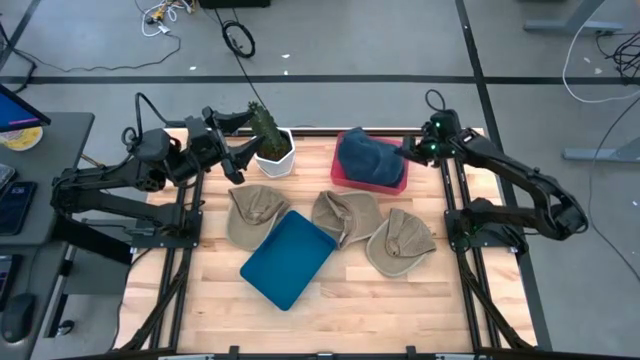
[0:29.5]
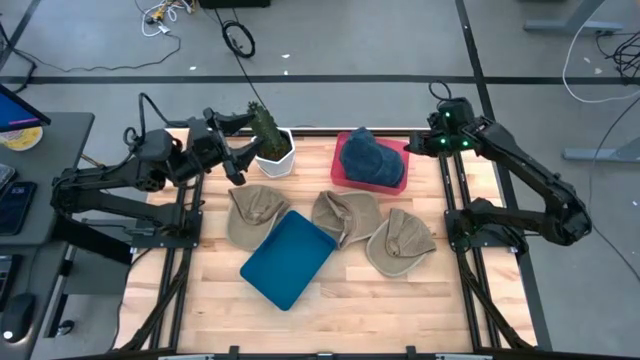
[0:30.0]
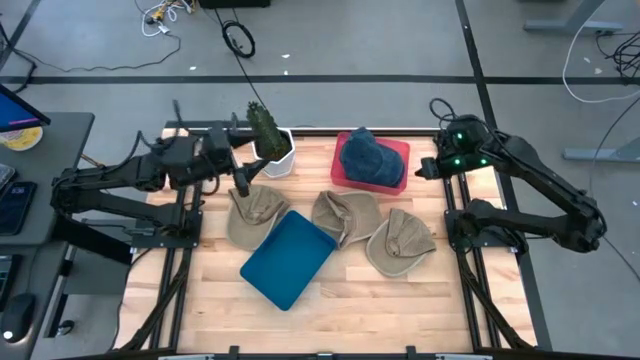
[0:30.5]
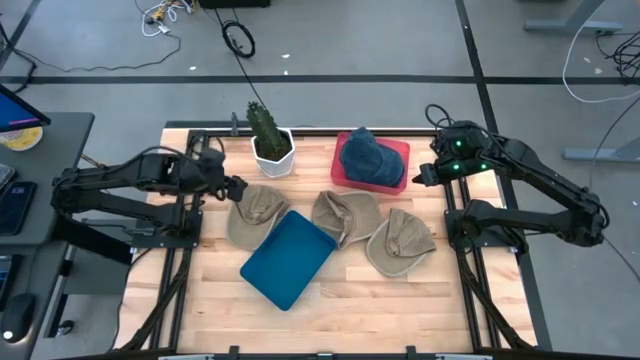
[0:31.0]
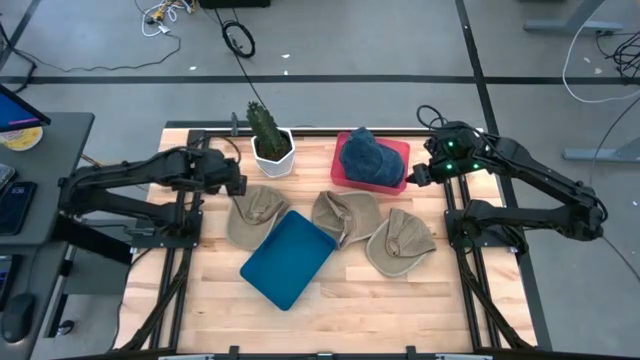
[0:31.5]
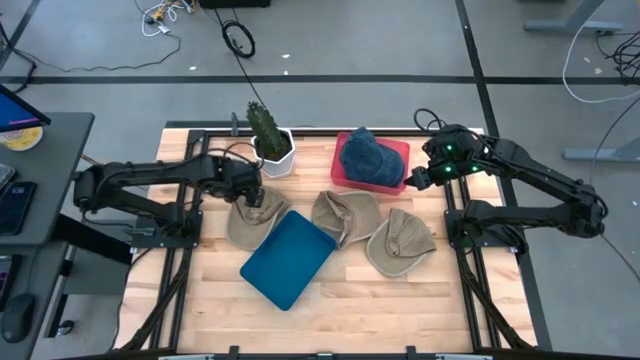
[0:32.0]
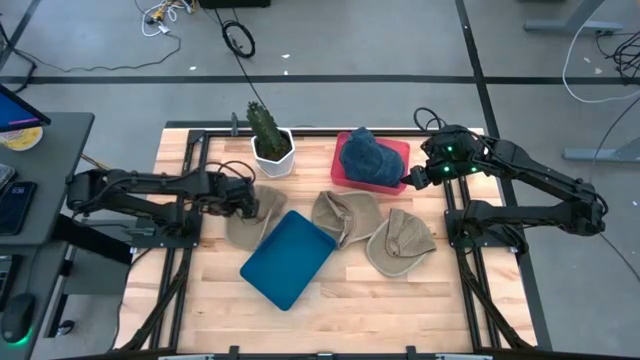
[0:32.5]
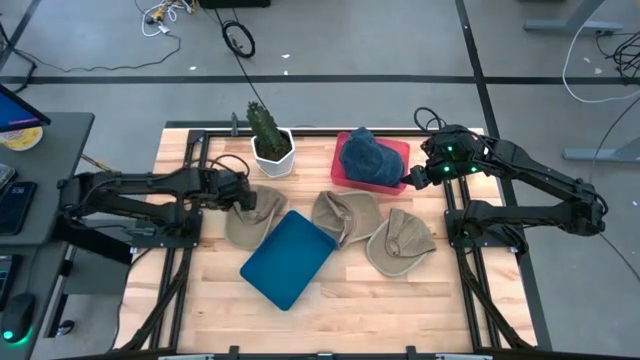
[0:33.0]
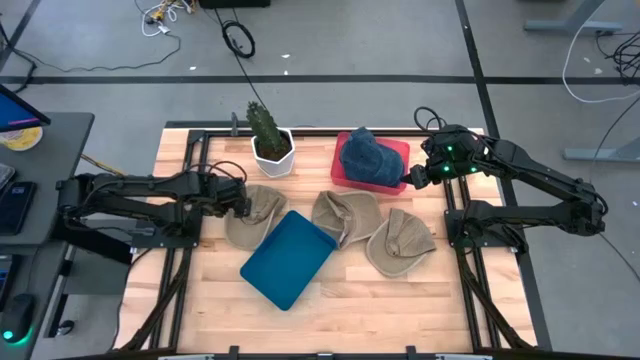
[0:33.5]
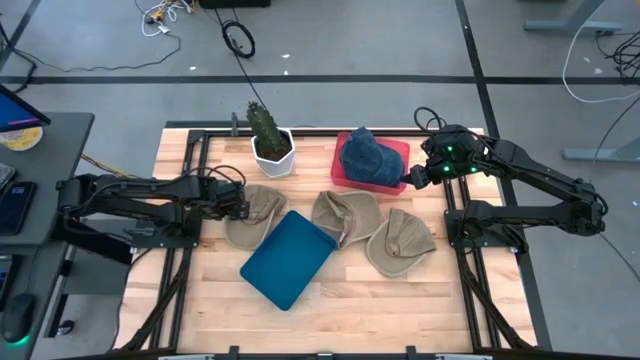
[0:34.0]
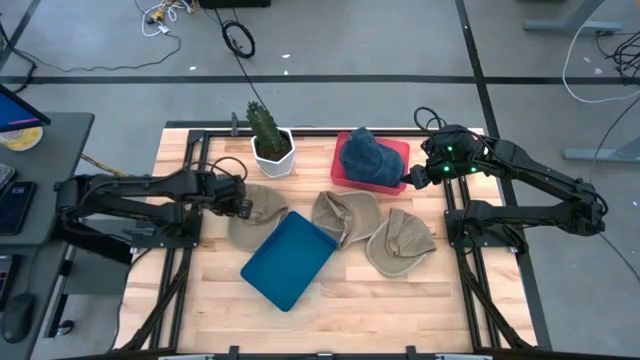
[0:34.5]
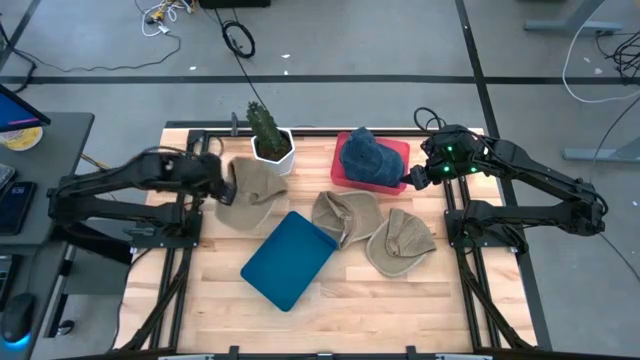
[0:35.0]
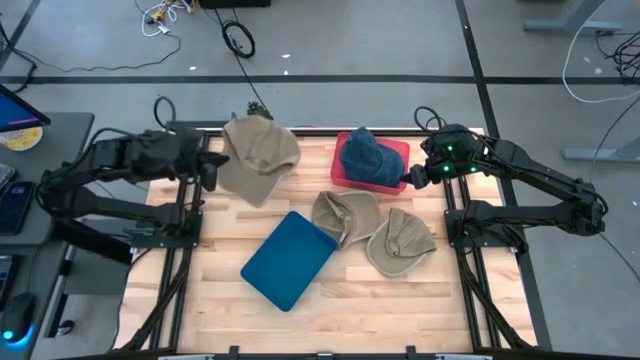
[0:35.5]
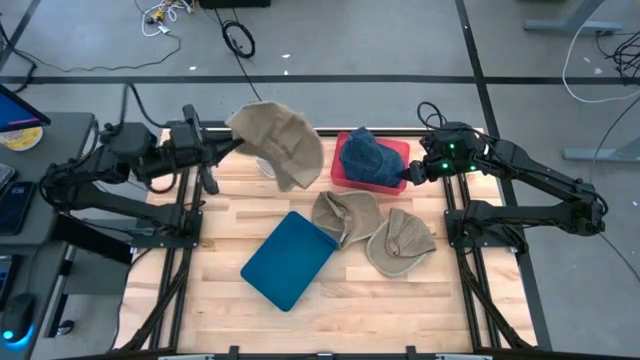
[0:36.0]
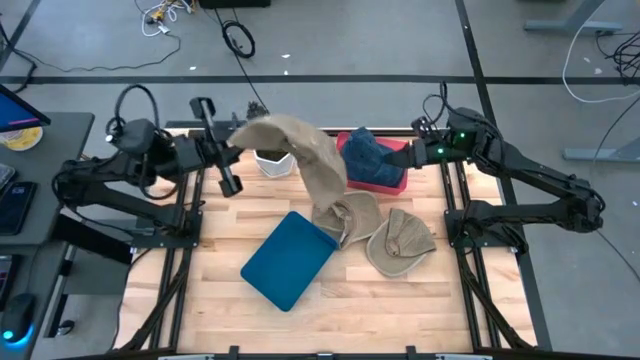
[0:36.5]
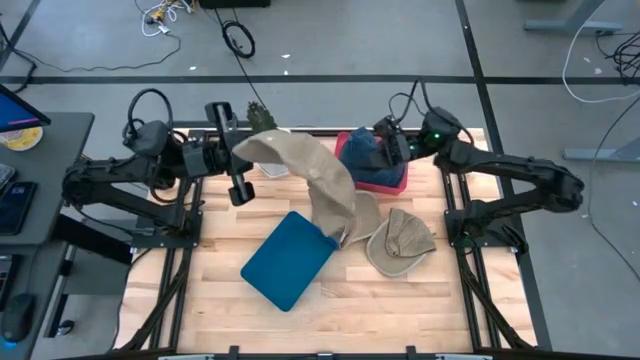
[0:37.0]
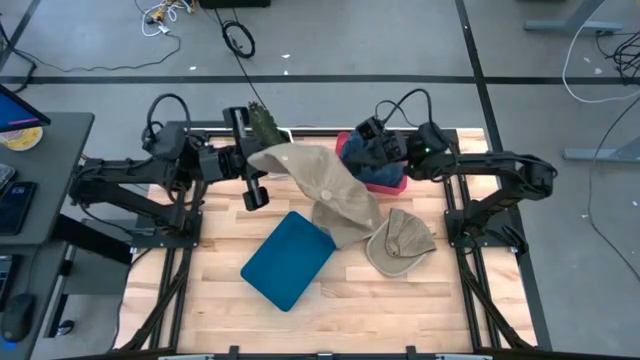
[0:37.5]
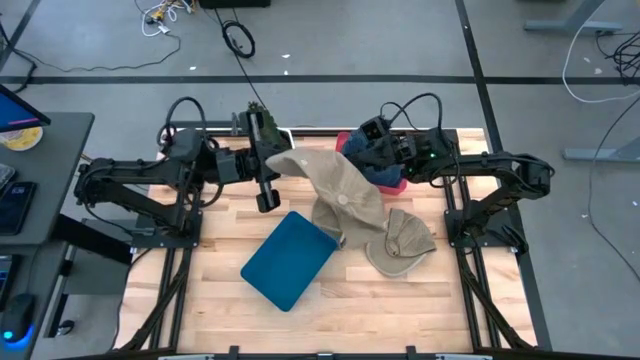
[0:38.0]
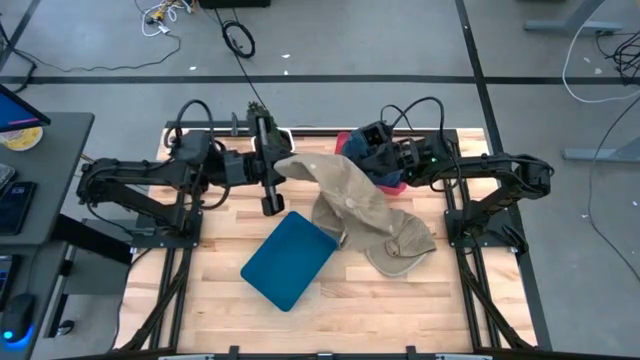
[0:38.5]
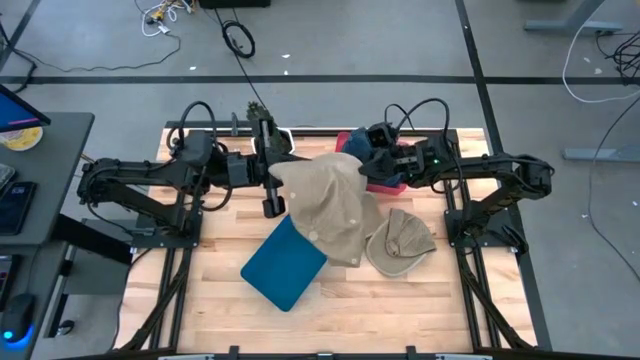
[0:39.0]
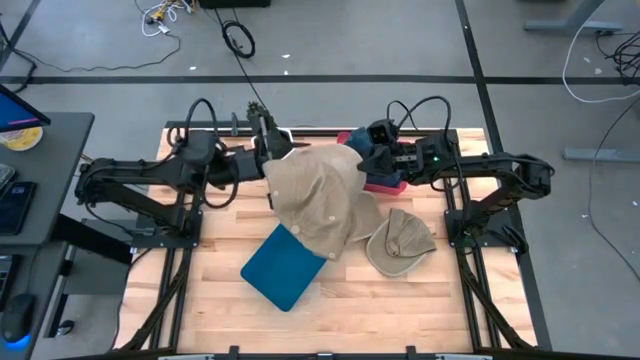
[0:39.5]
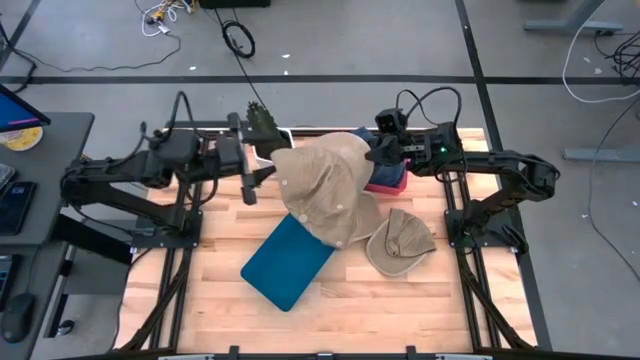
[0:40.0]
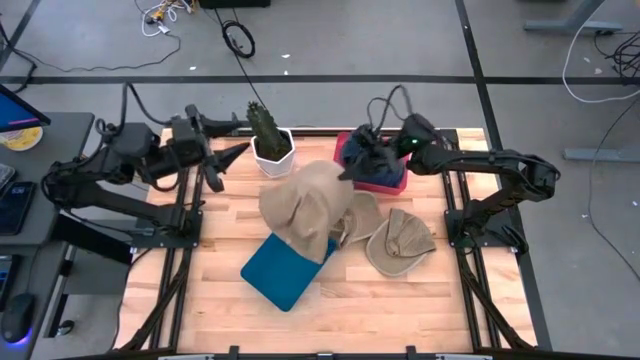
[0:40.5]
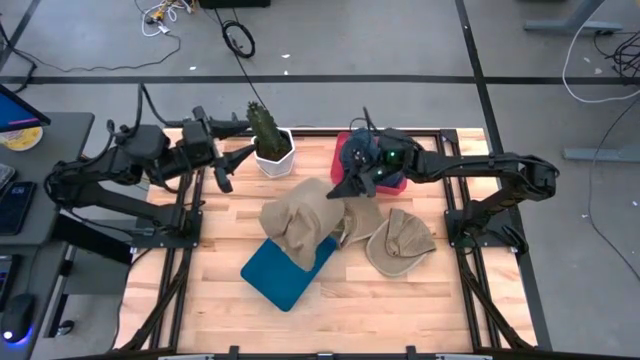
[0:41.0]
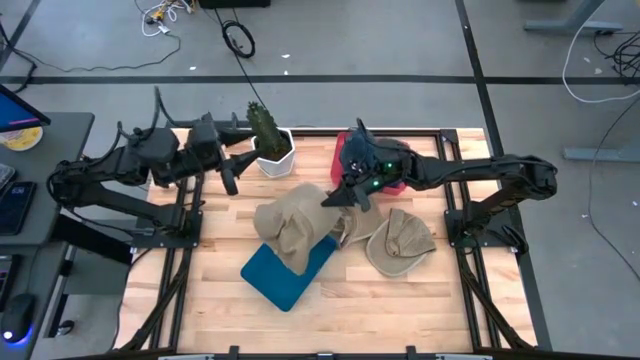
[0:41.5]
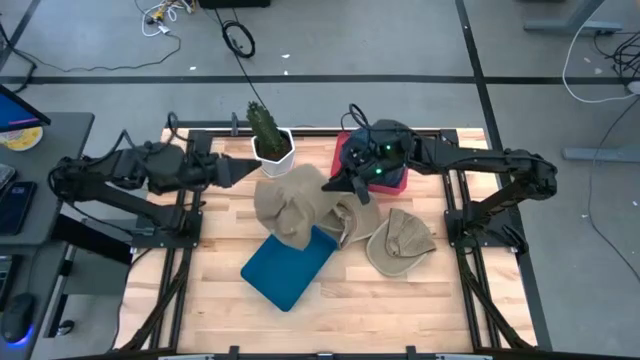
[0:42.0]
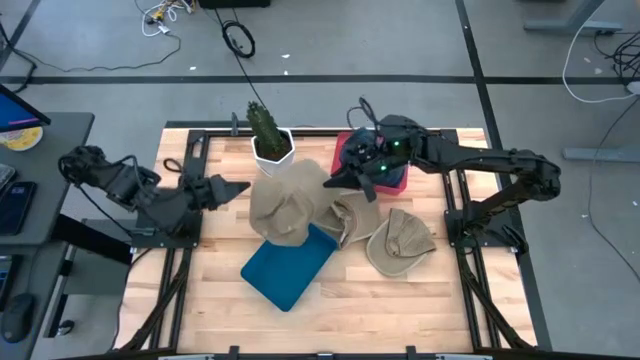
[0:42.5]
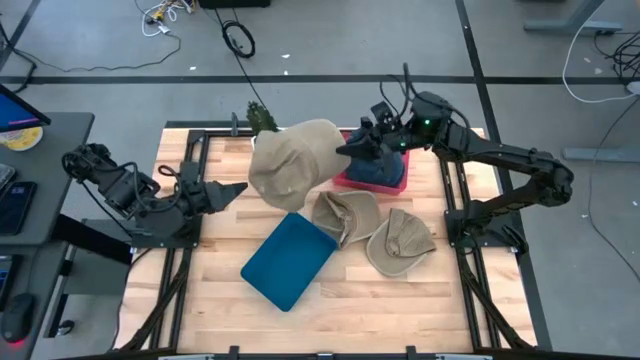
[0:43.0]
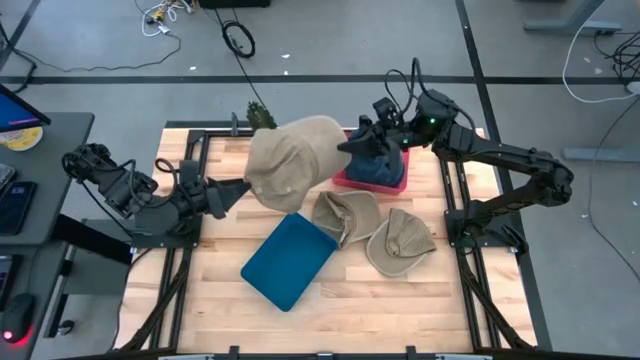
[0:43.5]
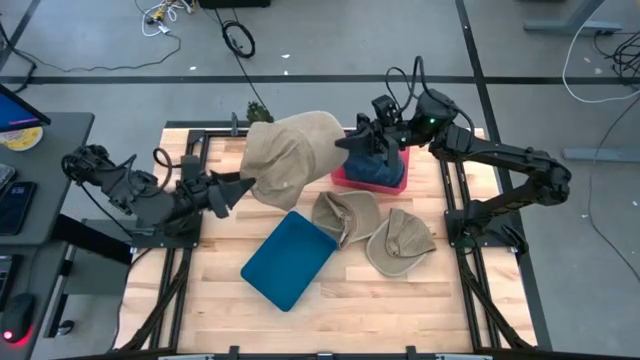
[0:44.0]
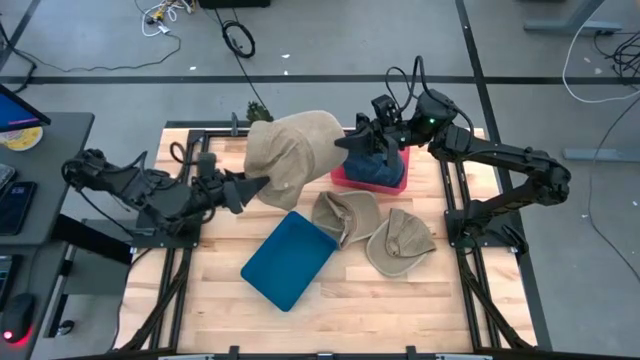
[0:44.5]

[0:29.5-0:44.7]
Task: Pick & Place hat
Put the left brown cap into the blue bin
